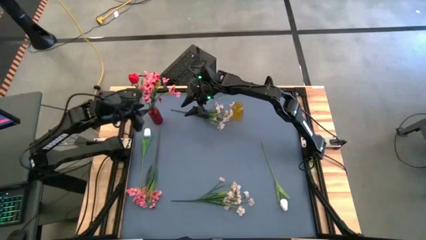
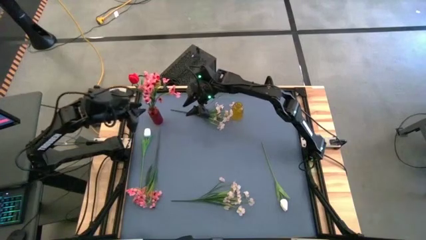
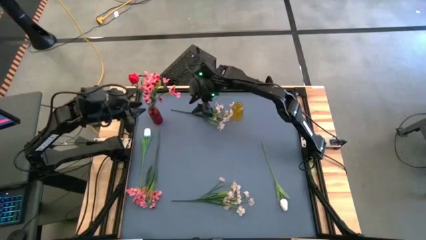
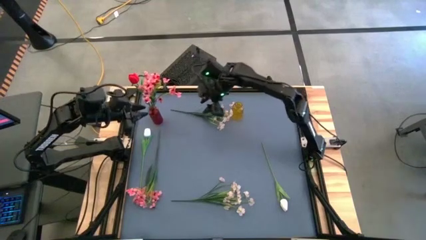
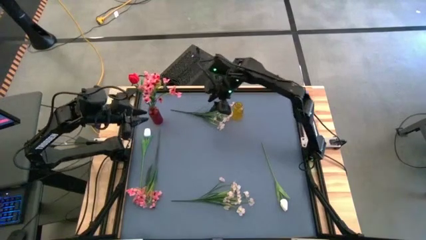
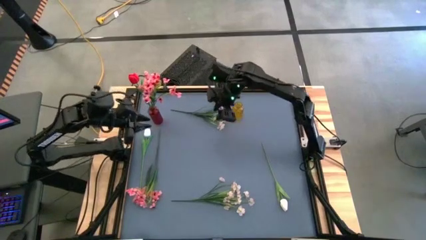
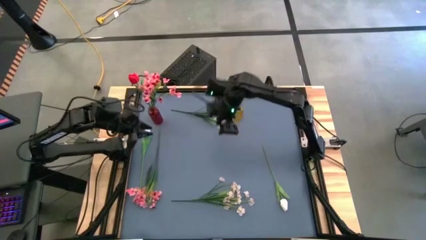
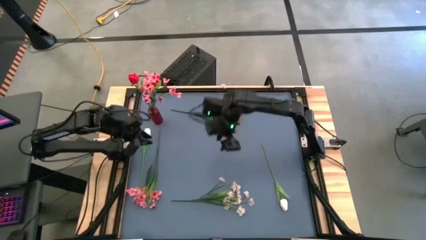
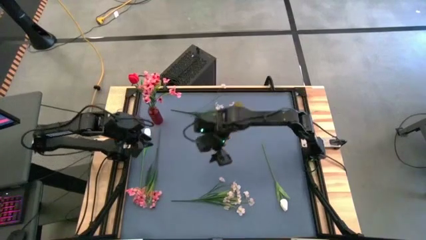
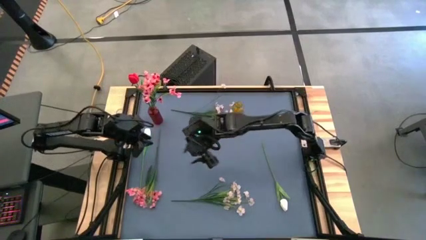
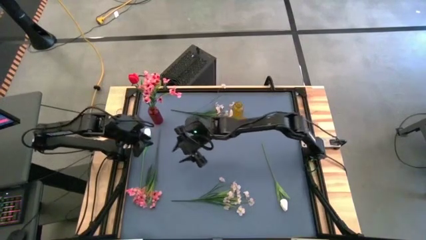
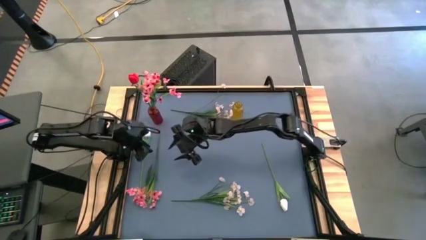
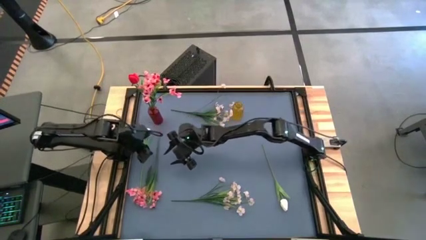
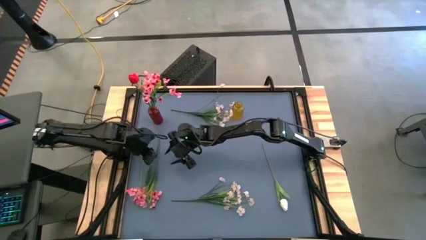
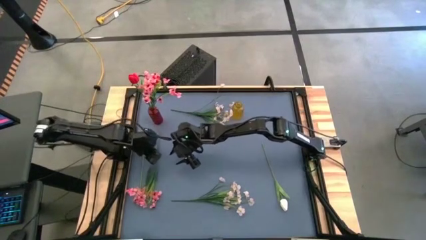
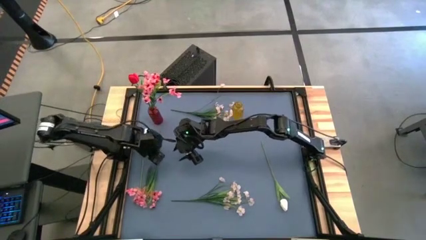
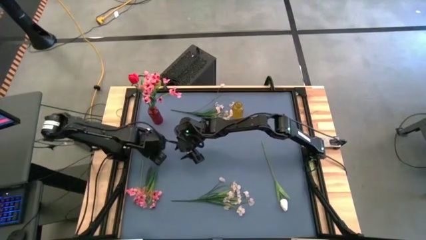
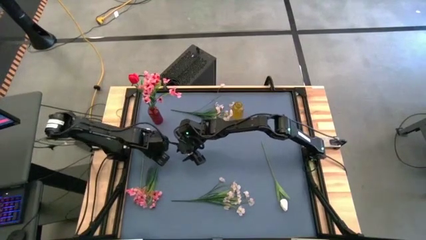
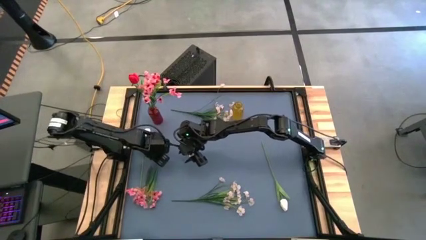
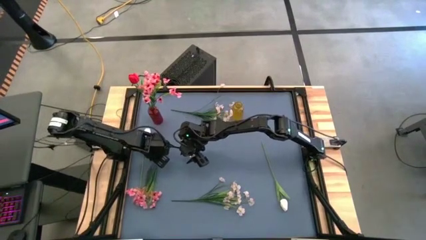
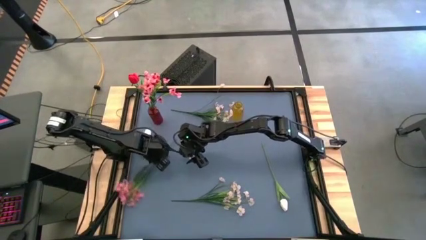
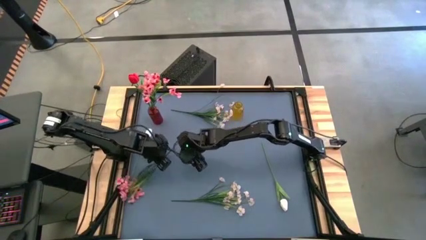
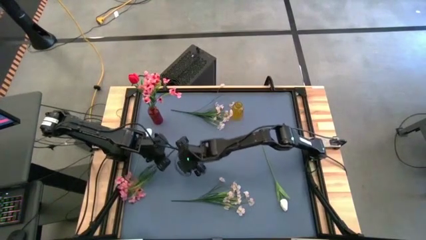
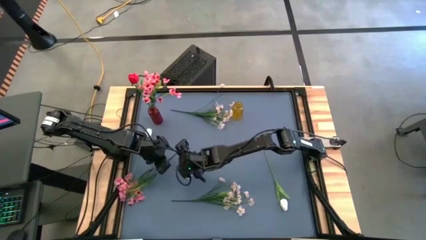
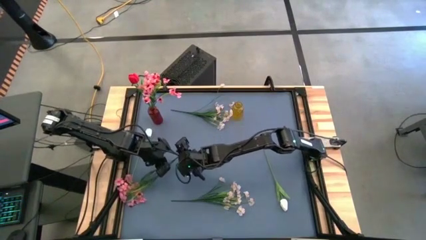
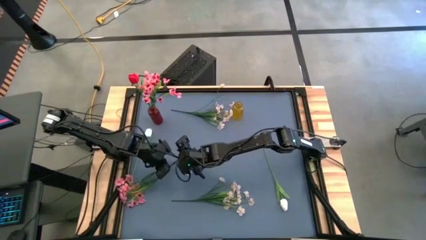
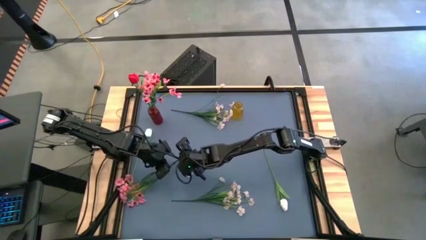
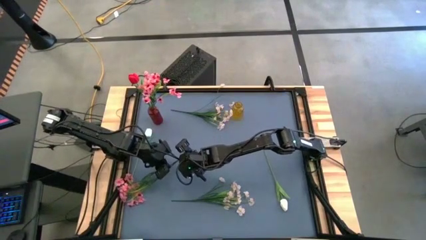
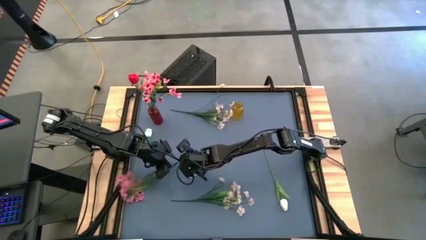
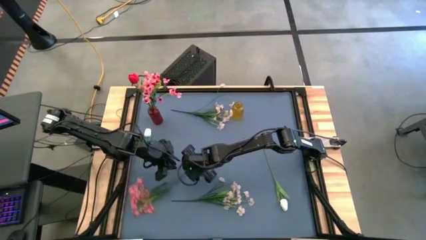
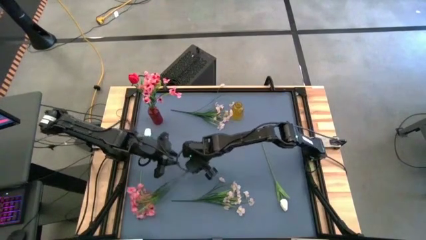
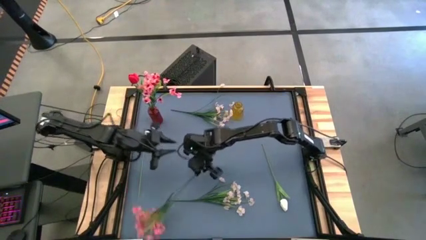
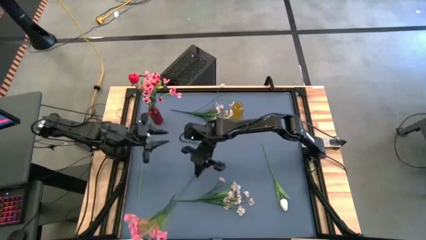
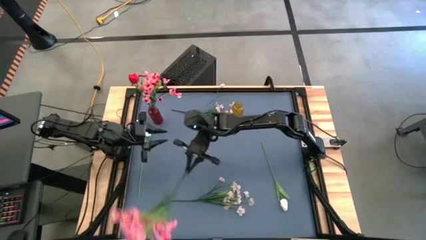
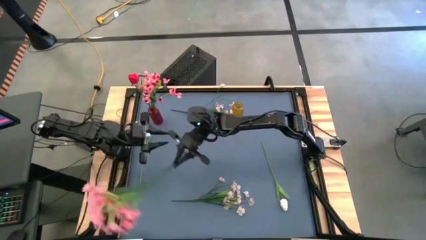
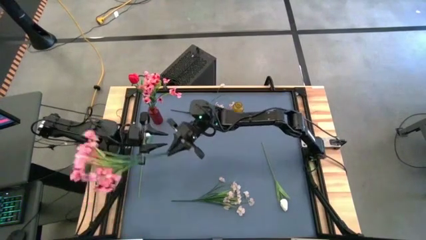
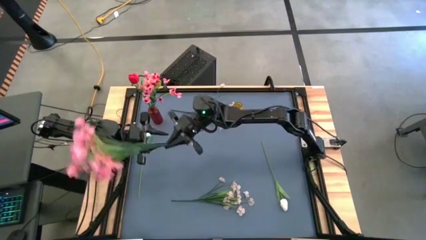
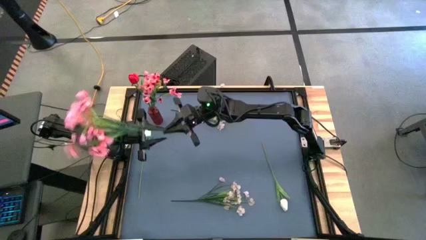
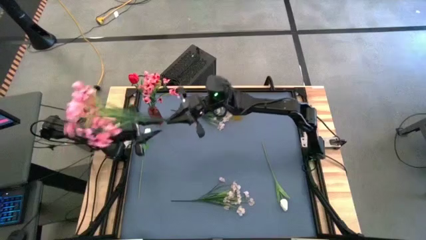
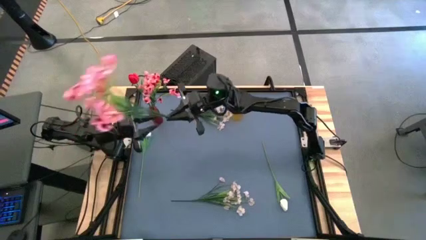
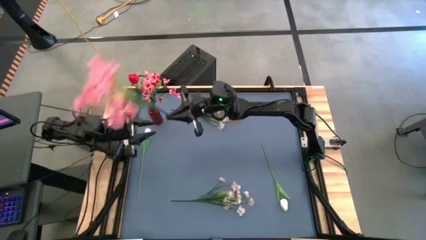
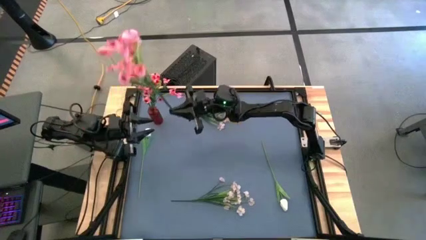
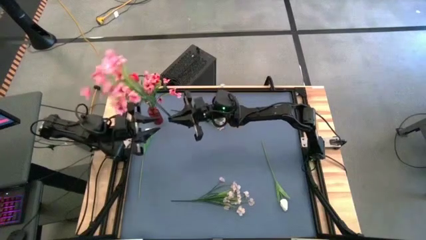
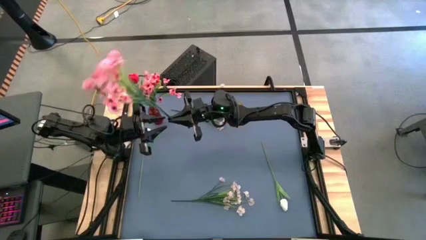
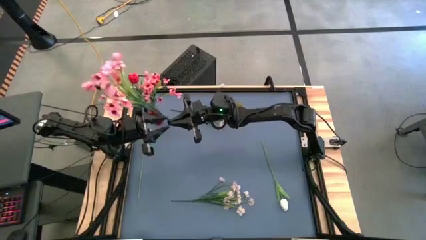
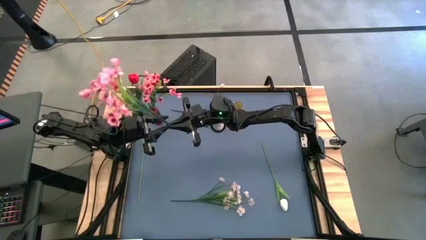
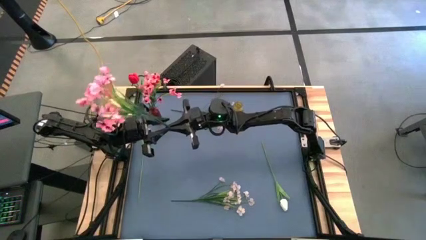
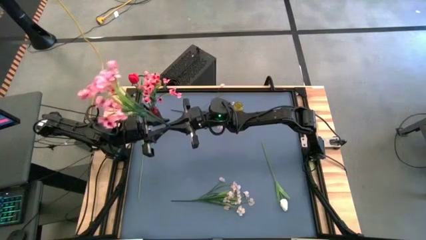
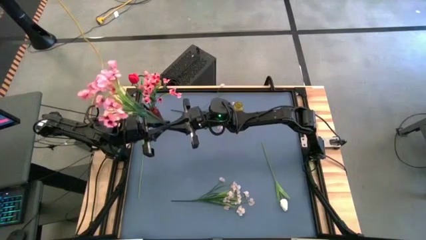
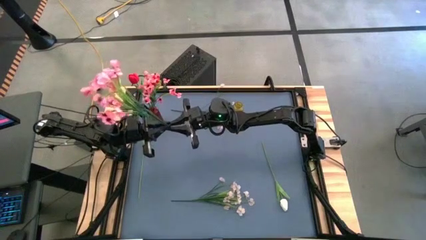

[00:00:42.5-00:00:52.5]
Task: Sort flowers into vase by color
Put the pink flowers into the red vase

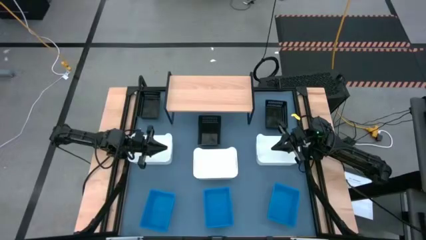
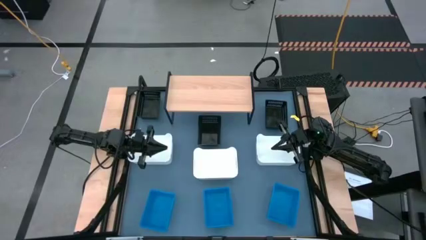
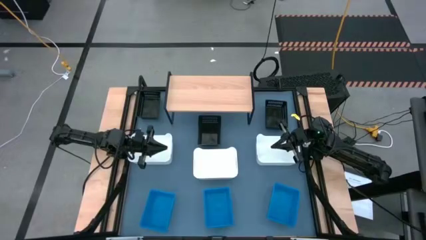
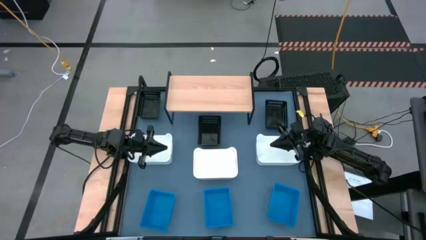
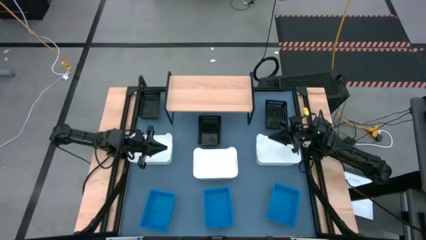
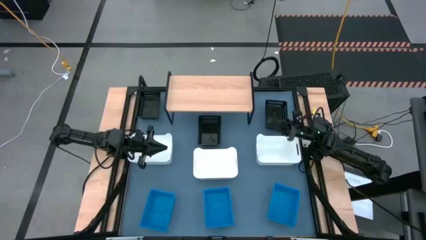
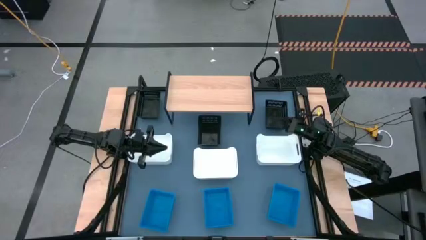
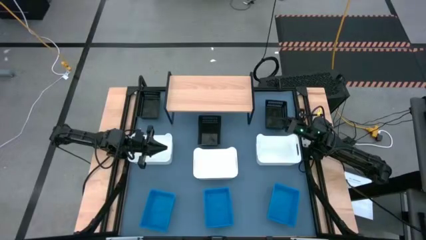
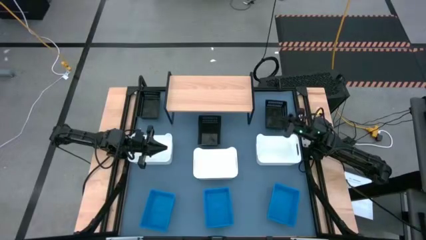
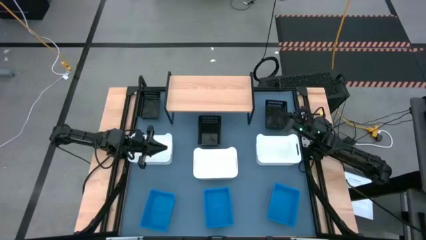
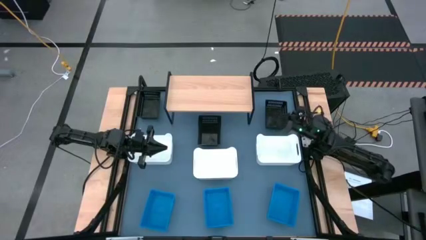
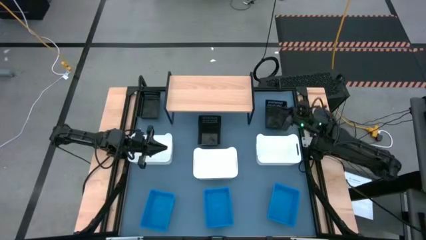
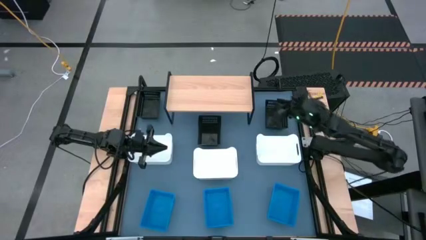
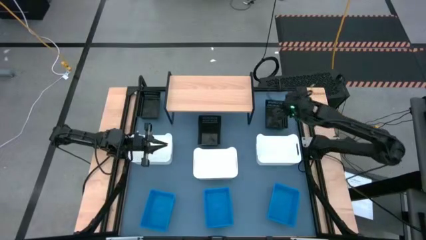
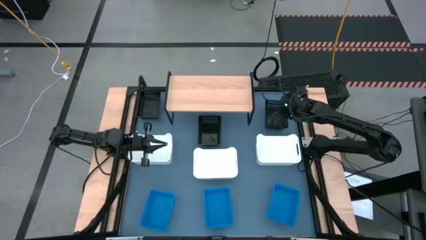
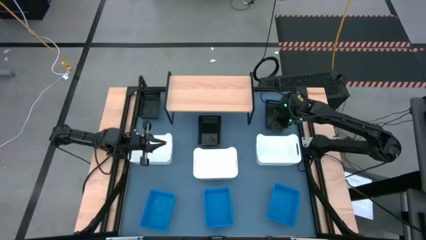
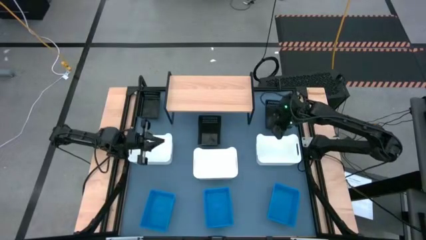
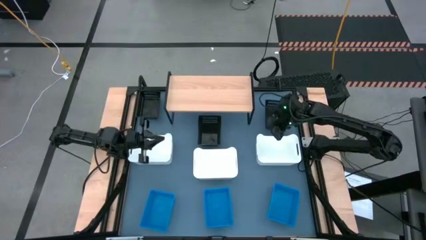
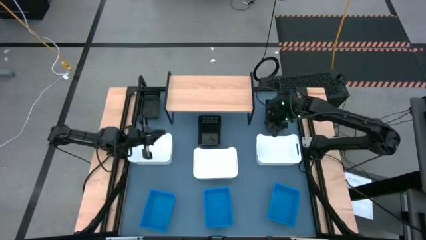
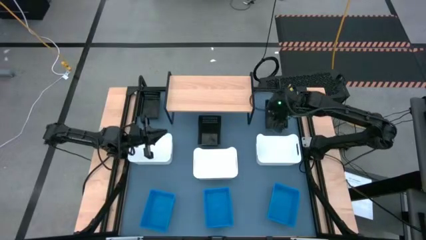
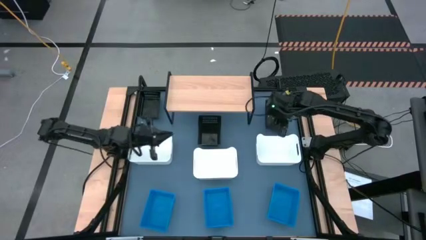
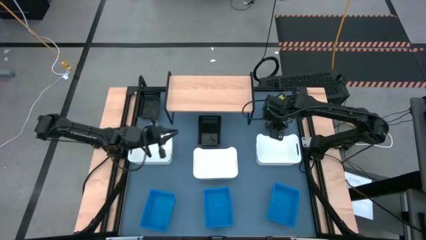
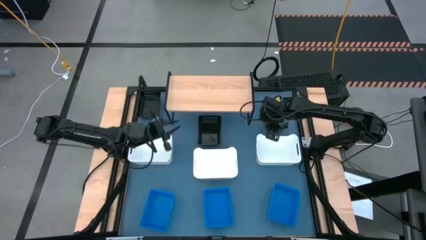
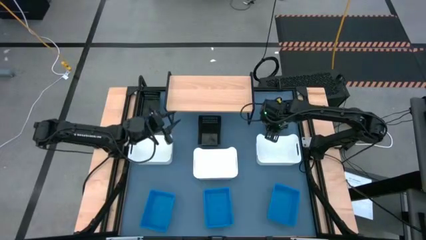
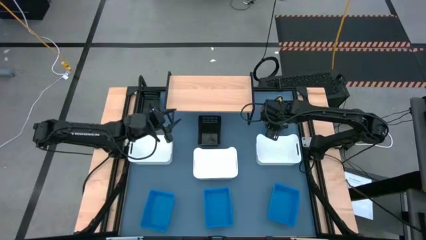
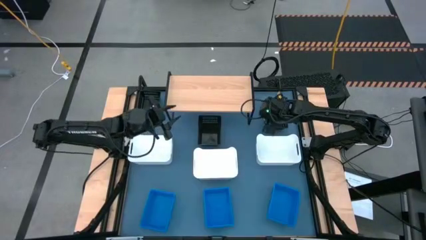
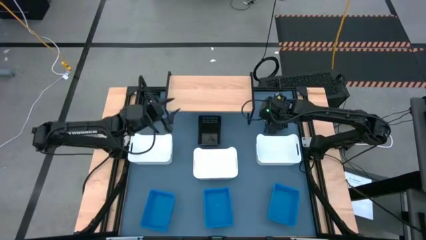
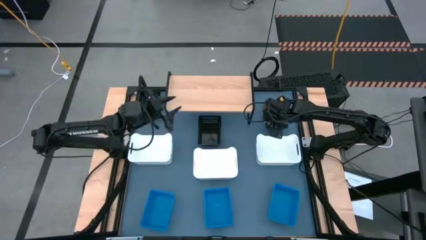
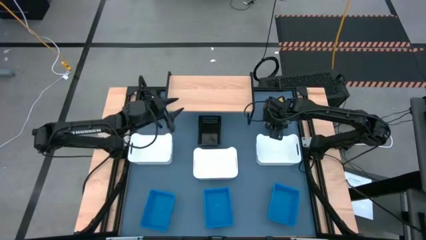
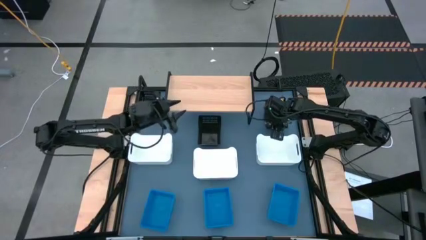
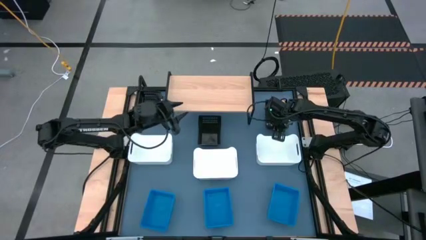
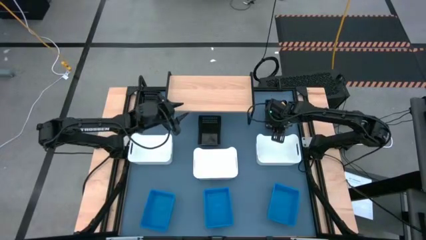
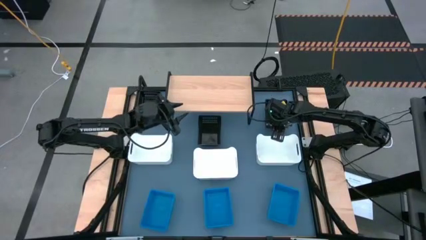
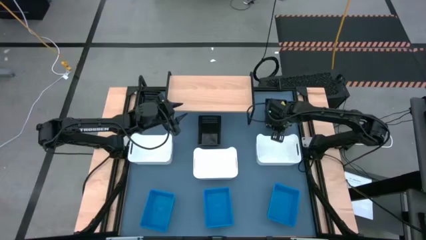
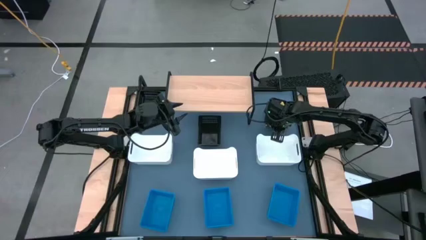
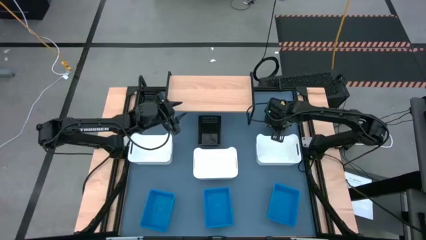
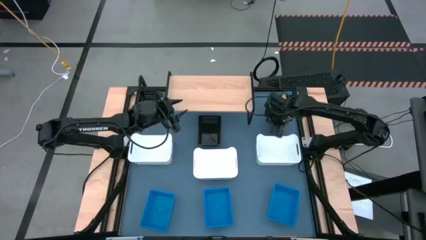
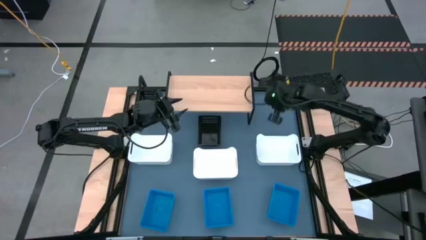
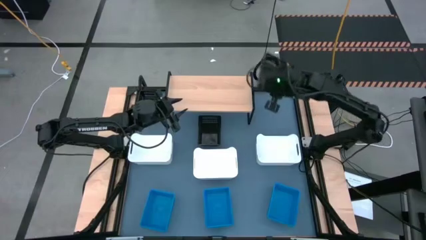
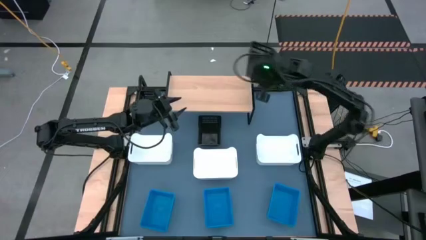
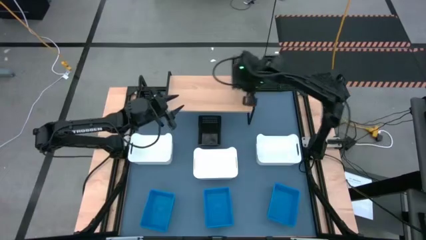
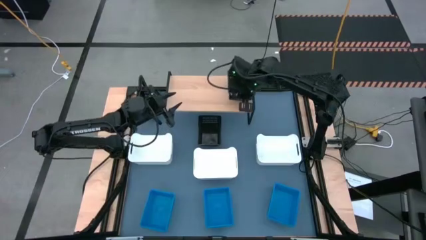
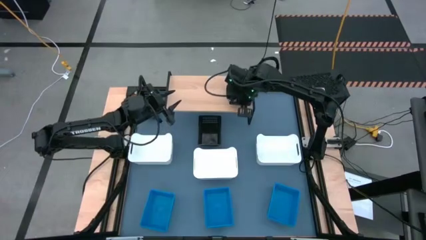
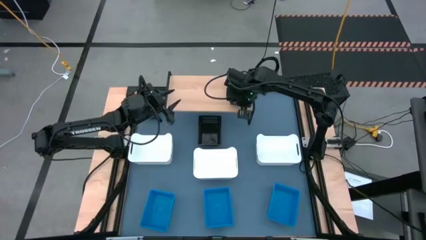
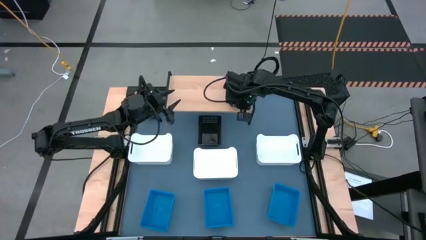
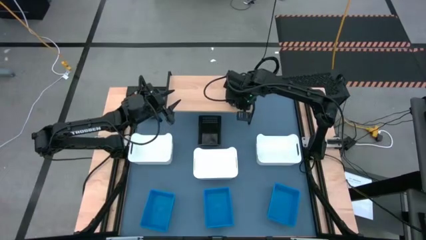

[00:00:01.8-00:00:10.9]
Task: Stack baskets on shelf by color
Put the black bin on the shelf
